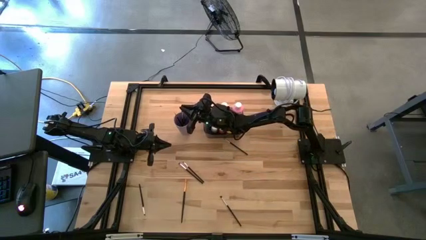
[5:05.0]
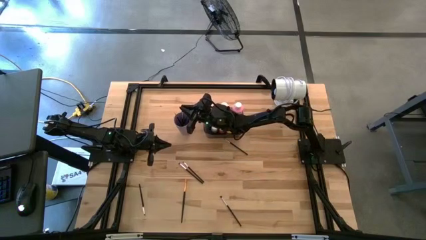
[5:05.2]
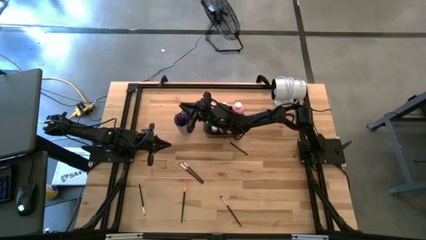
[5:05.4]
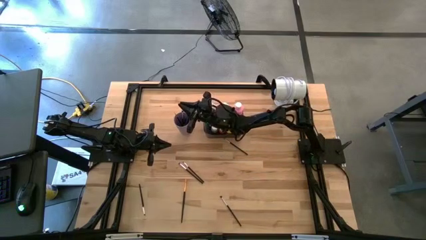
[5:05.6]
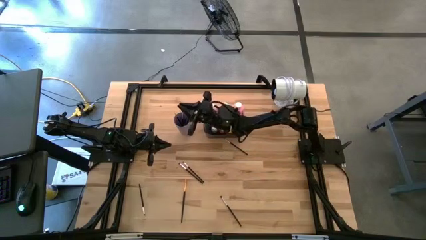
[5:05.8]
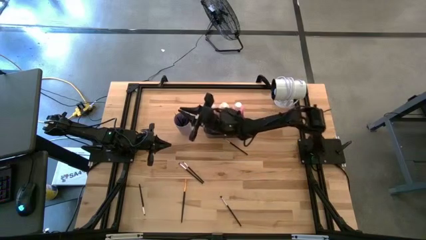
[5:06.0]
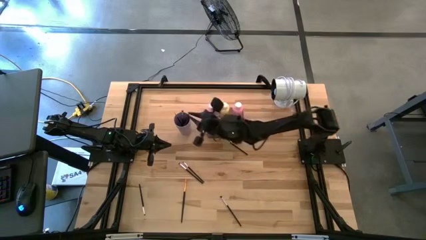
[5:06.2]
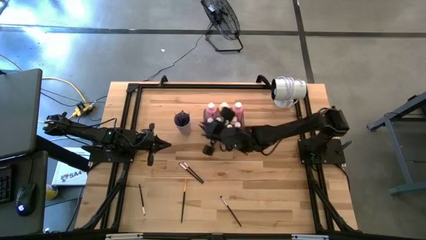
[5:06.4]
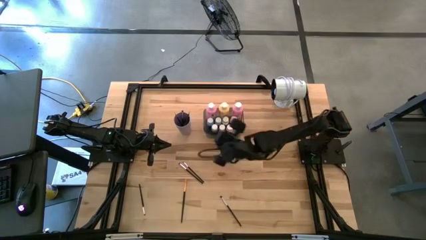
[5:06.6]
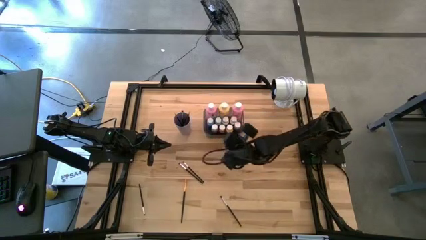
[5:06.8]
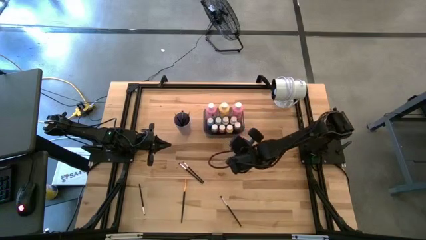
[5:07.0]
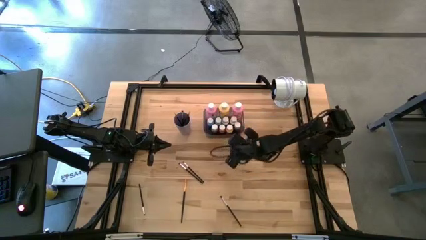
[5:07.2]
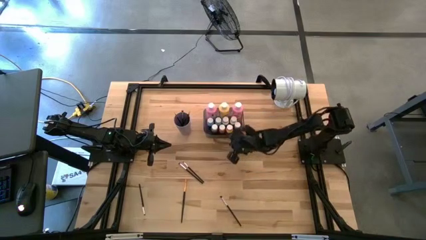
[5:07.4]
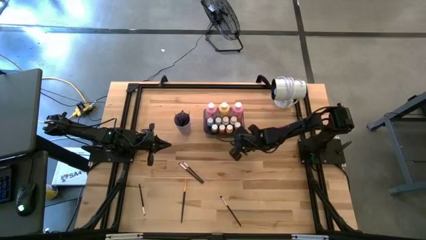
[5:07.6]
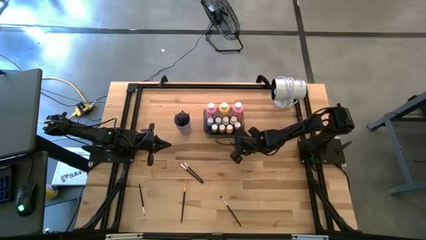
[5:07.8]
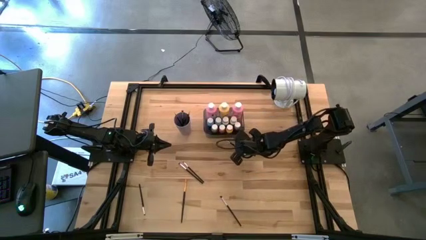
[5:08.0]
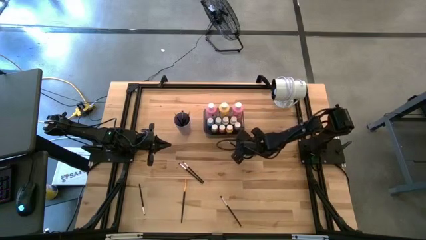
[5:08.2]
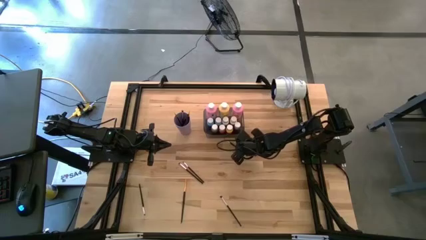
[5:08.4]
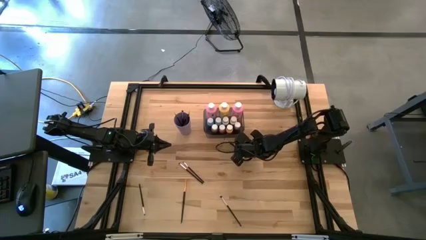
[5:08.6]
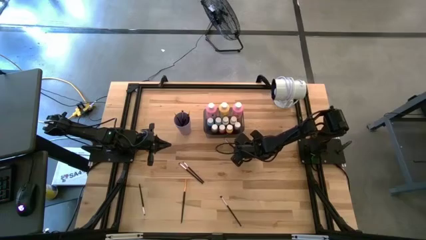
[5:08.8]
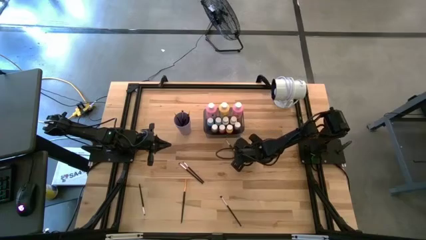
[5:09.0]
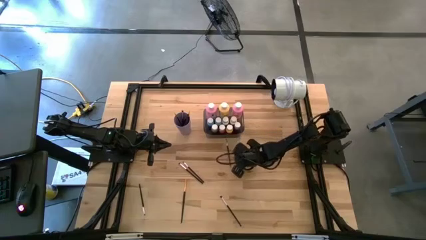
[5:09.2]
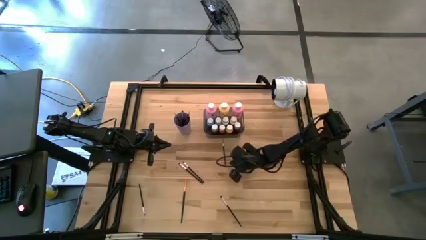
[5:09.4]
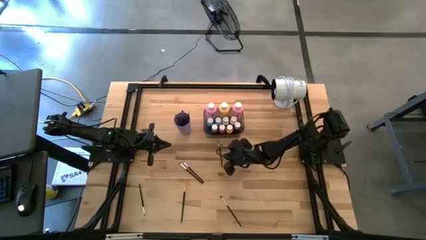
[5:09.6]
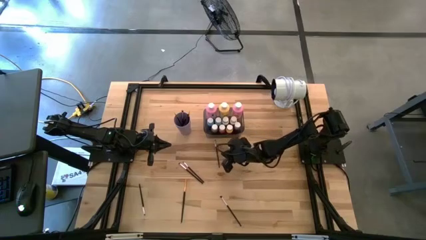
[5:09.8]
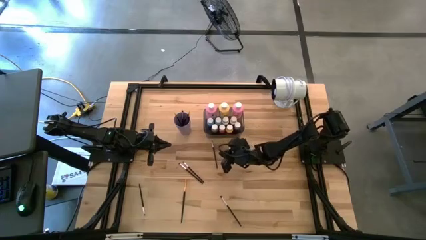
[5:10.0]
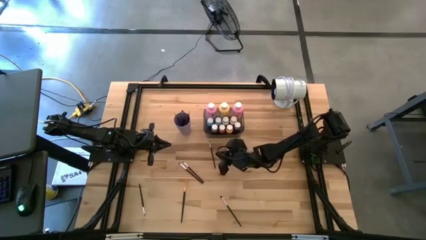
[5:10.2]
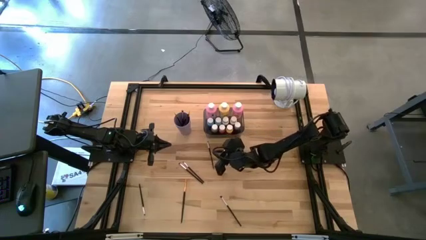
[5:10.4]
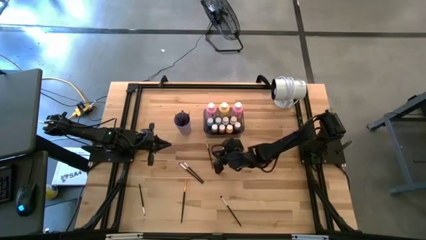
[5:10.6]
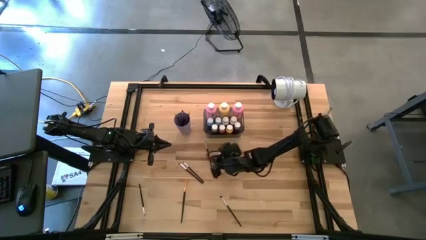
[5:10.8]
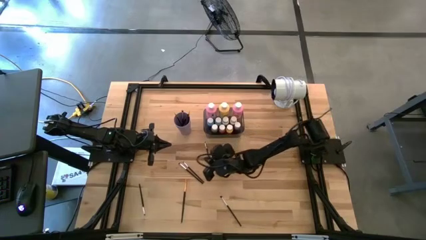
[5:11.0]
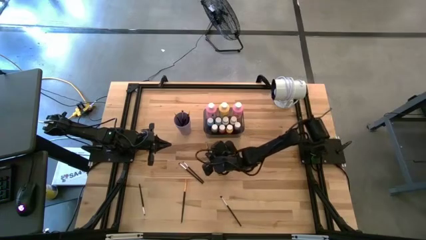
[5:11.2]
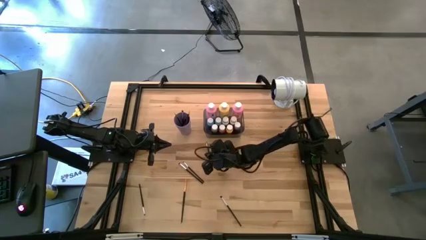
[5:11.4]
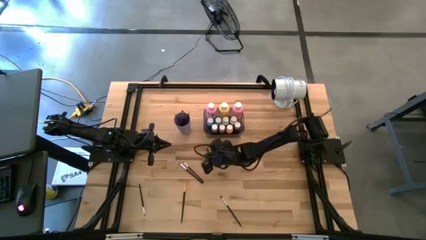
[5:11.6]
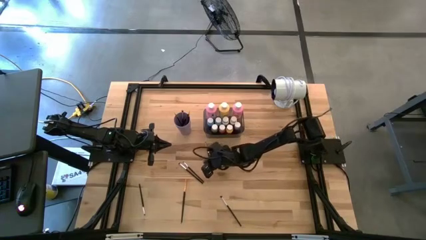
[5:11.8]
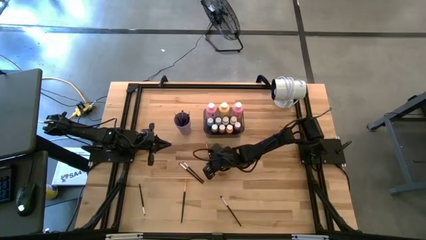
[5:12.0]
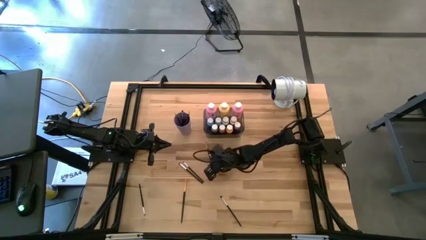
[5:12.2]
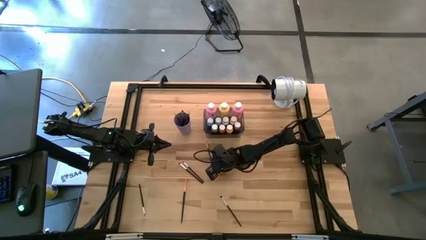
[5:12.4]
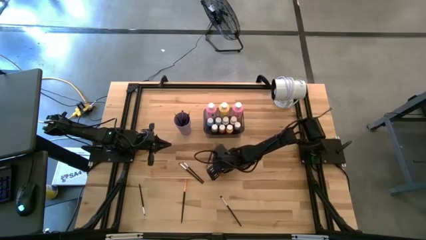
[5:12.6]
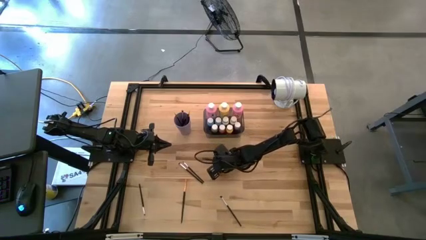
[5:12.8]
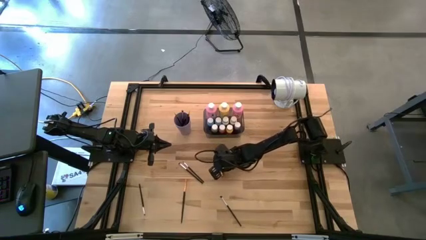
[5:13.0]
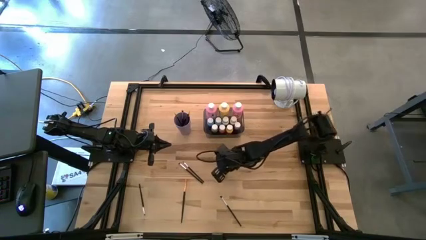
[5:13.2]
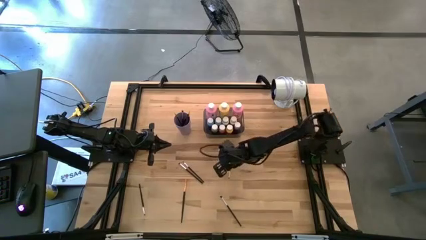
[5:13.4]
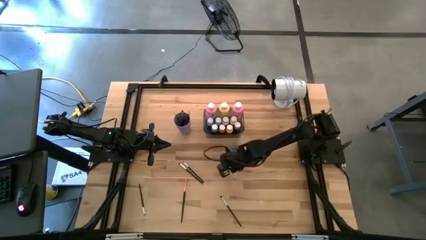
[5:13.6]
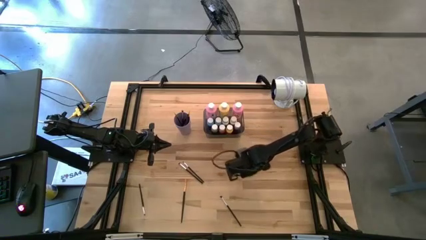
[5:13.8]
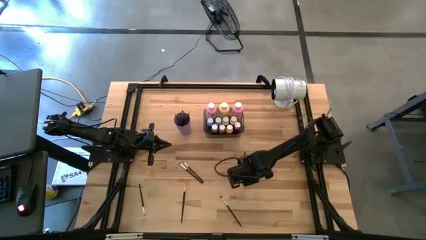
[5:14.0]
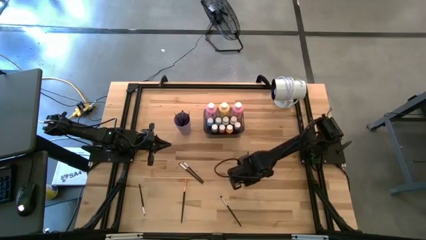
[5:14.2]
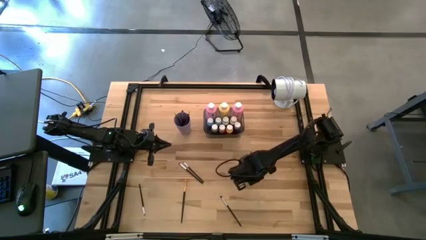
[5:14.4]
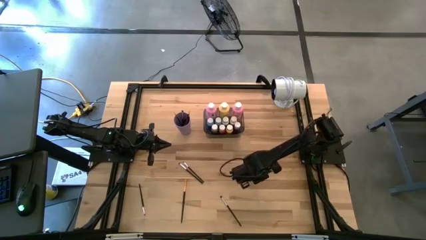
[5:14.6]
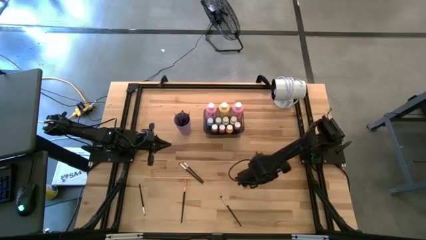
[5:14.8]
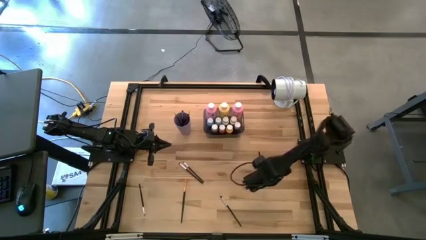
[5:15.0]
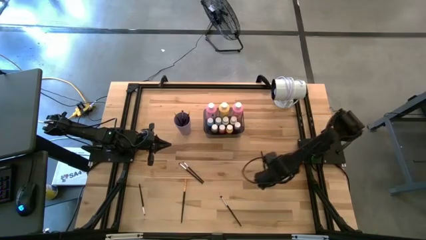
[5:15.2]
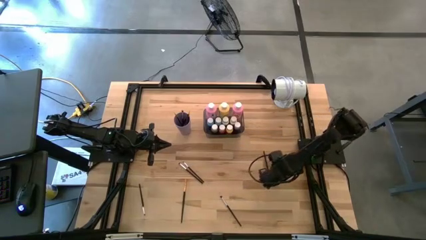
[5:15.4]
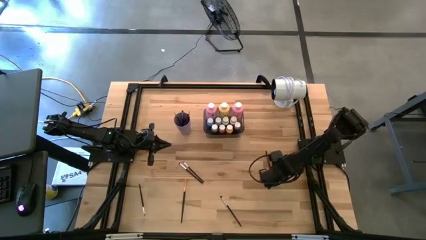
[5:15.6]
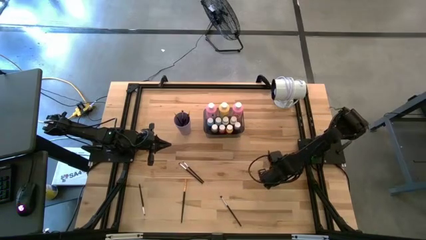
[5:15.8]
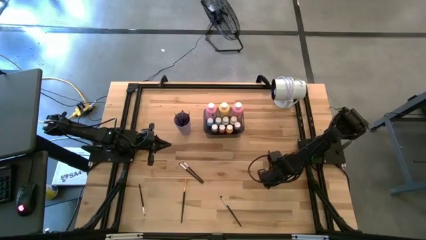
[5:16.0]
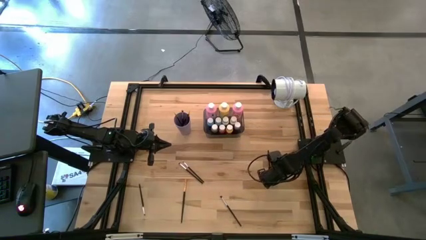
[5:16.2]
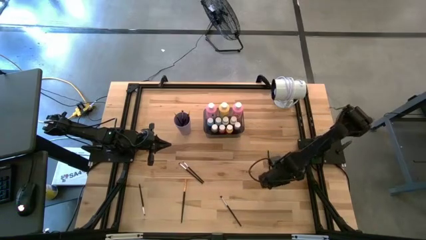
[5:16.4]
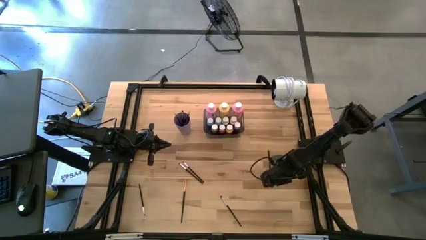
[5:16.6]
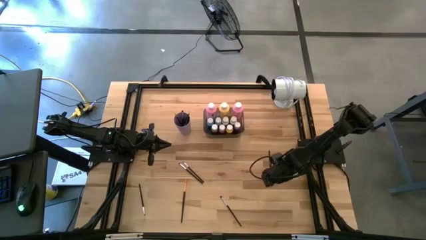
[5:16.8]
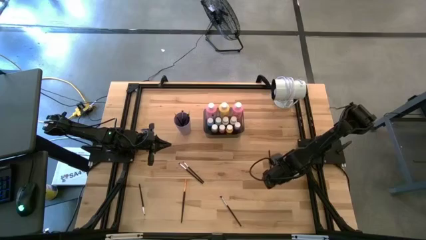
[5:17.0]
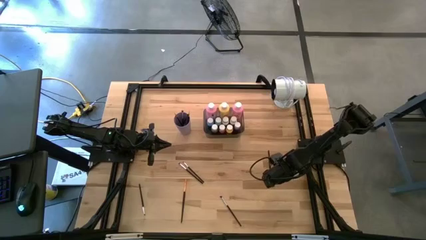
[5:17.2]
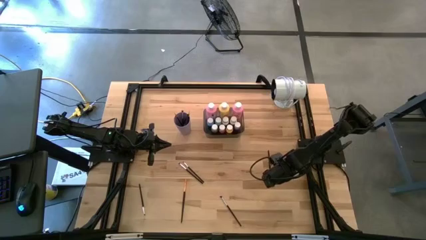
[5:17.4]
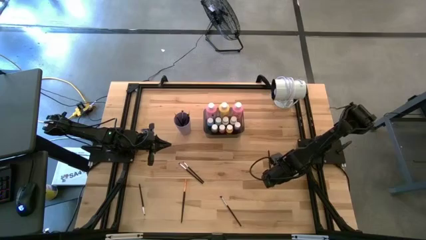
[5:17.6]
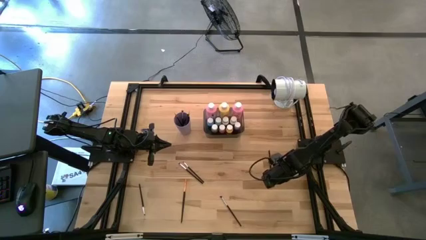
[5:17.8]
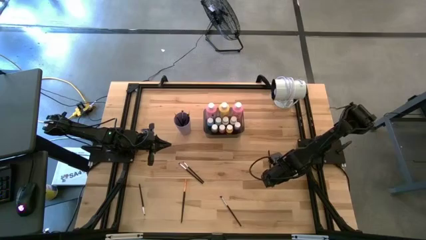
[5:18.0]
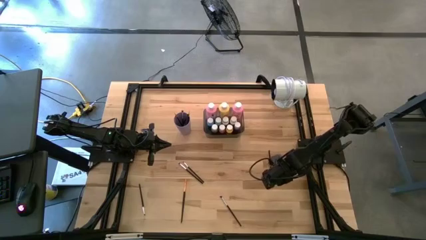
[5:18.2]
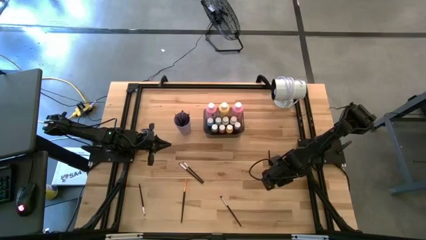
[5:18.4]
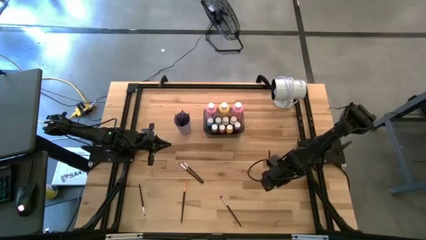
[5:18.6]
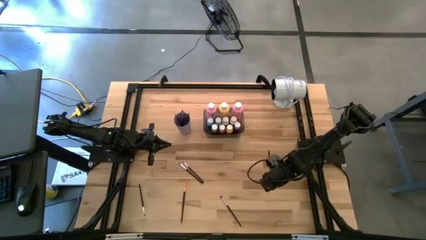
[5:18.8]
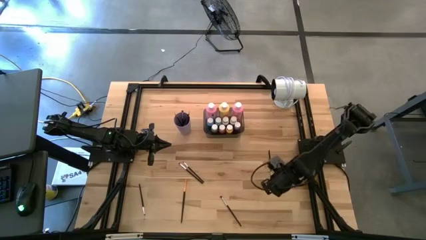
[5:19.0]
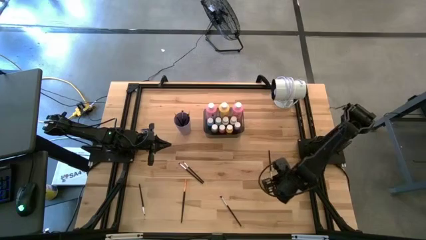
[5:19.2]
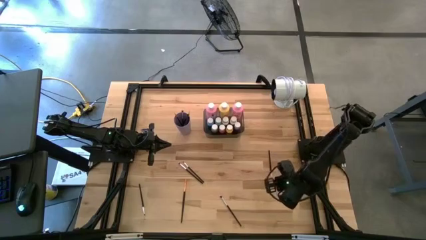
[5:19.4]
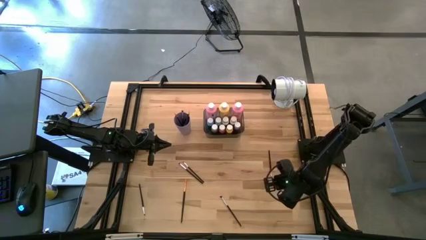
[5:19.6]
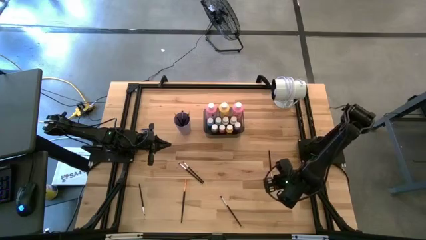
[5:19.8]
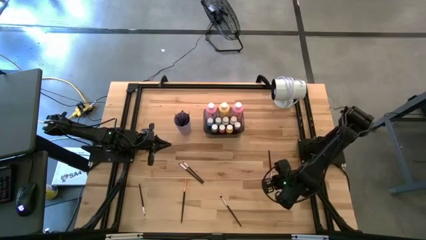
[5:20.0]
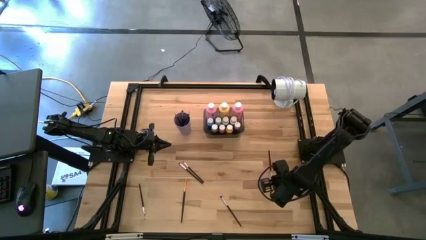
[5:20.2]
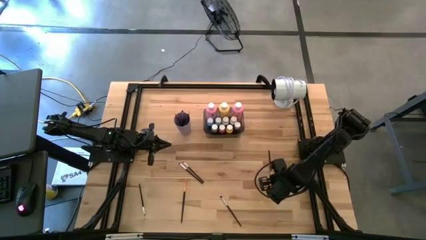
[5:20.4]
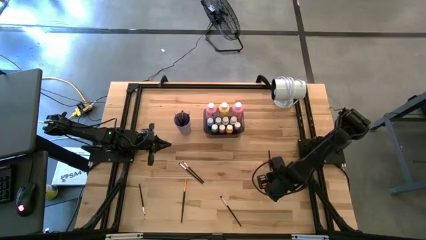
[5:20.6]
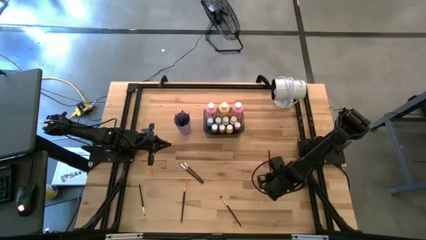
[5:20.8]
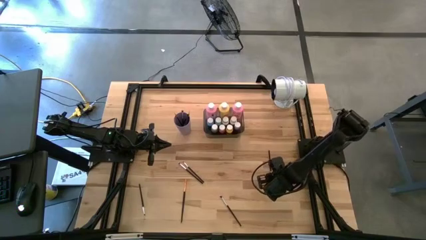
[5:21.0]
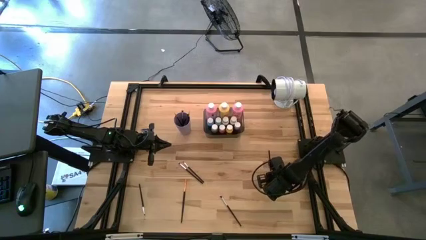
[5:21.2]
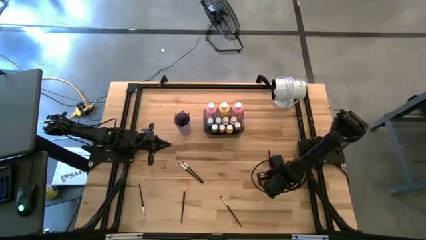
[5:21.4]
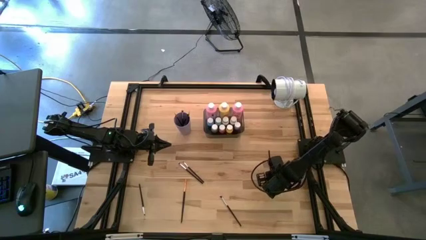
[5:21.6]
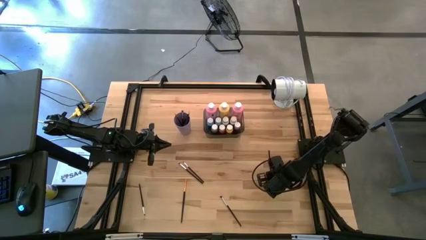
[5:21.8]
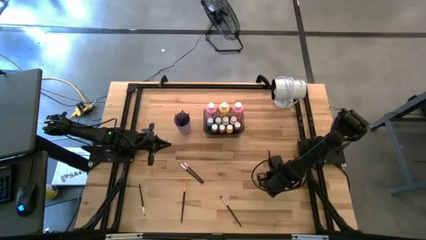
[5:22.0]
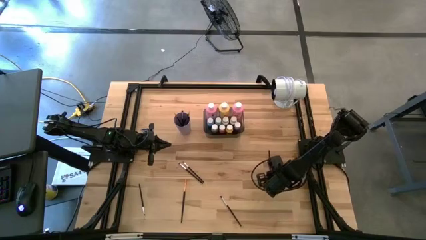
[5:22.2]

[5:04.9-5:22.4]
Task: Pick & Place Paint Supplies
Put the silver paint brush into the purple cup
